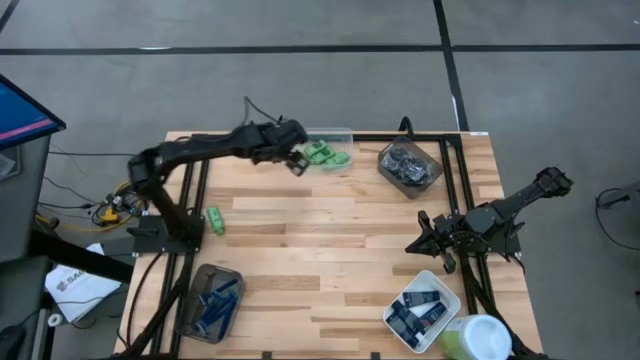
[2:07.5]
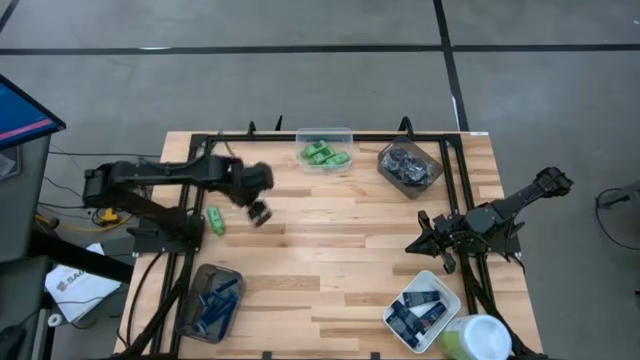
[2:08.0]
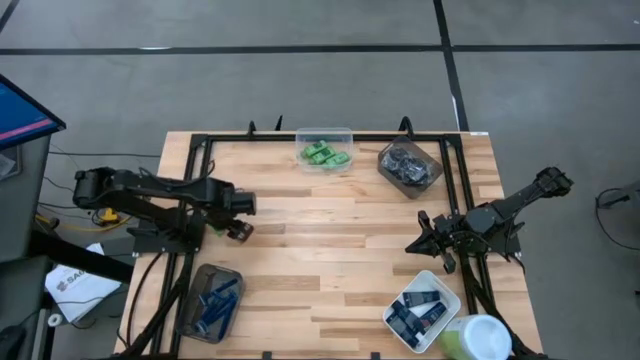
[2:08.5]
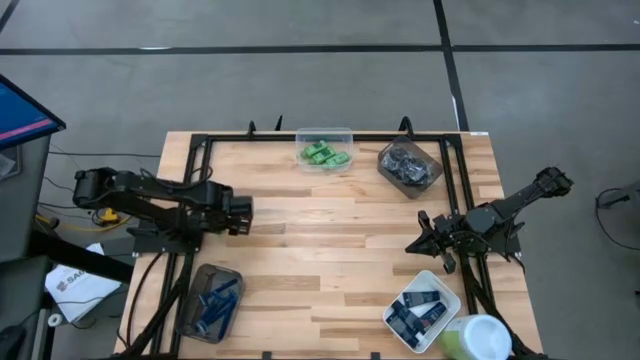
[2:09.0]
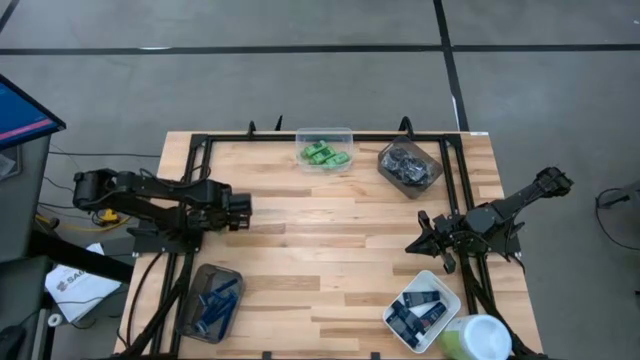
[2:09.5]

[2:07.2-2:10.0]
Task: Pick & Place Travel size toiletries
Put the green shampoo into the transparent bin

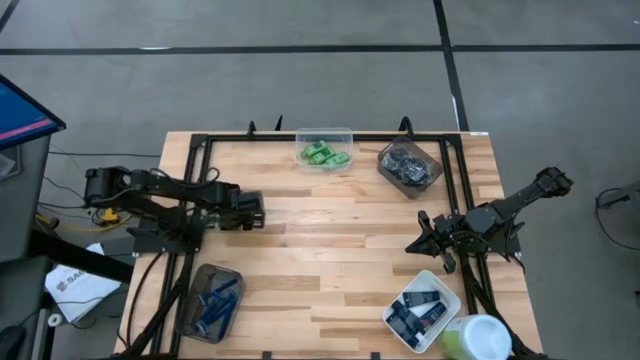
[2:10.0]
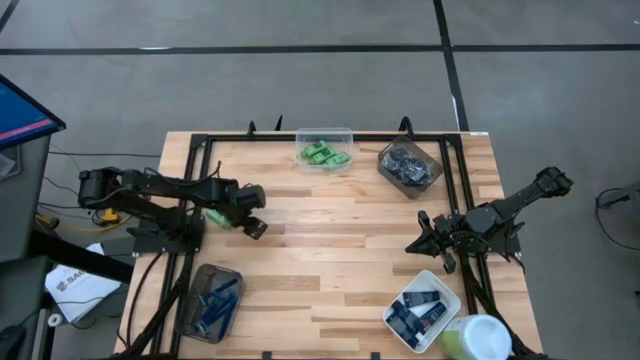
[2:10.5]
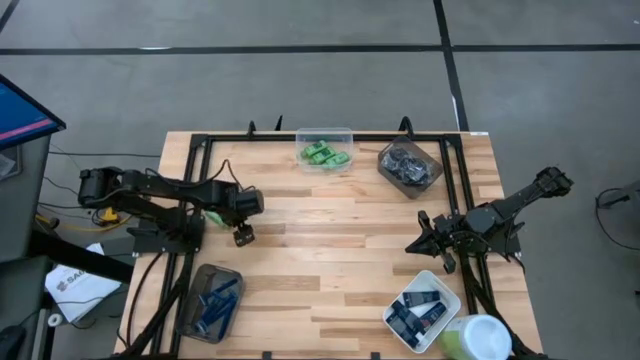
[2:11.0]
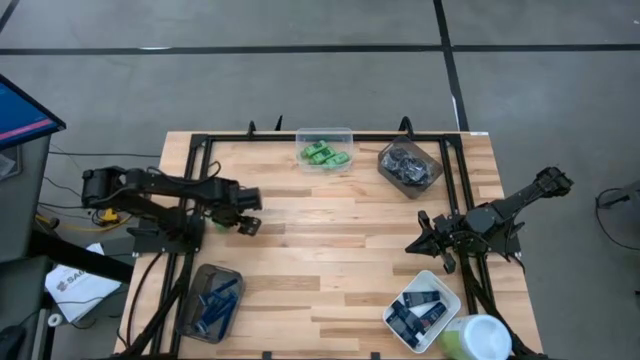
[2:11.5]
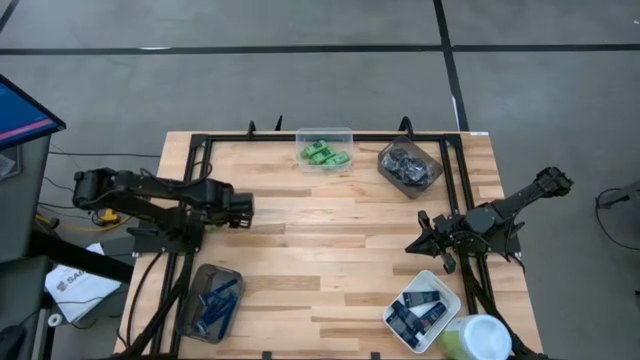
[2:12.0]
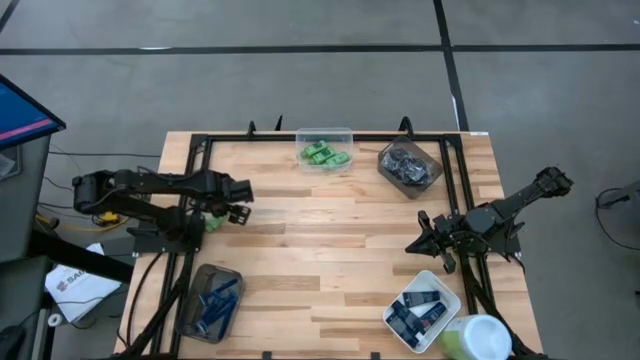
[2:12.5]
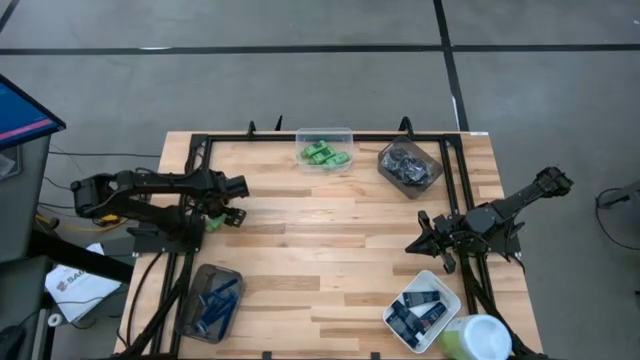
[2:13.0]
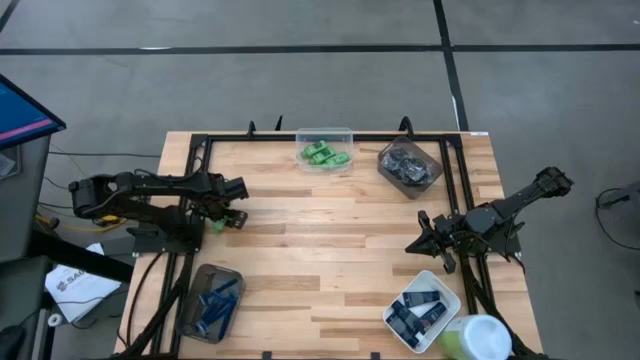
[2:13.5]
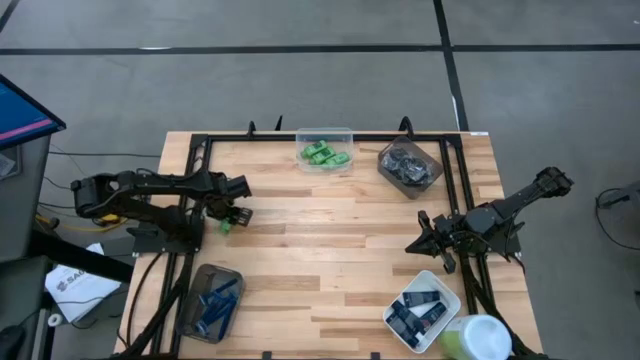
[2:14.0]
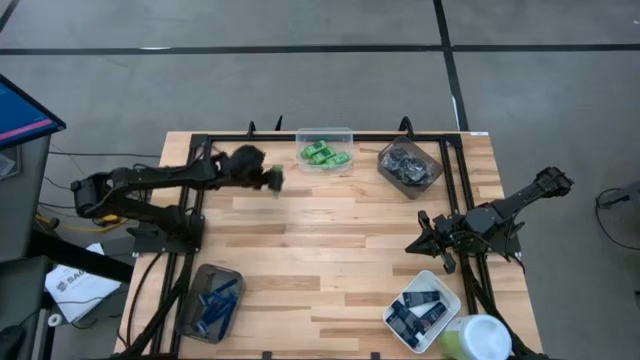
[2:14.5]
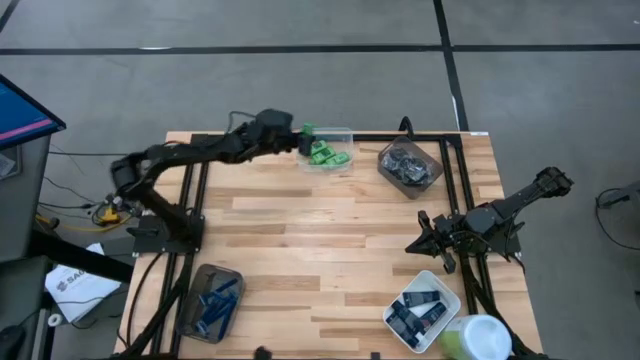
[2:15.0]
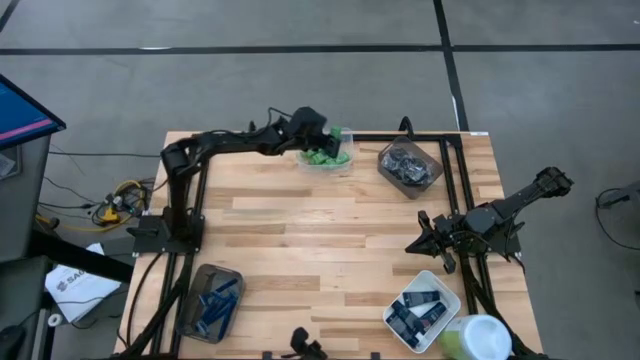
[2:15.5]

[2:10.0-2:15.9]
Put the green shampoo into the transparent bin

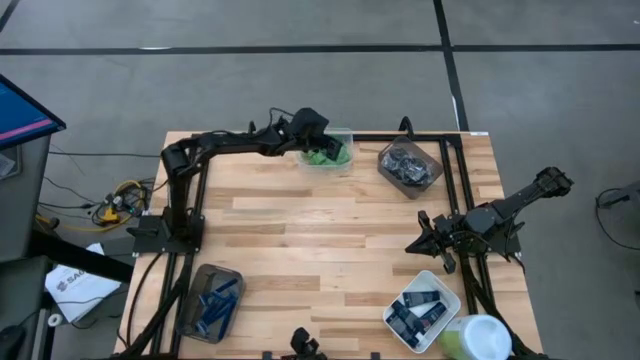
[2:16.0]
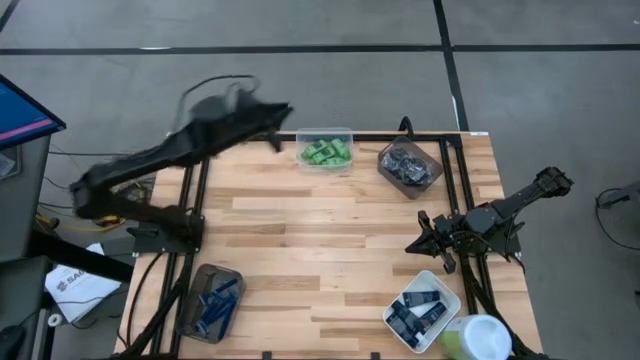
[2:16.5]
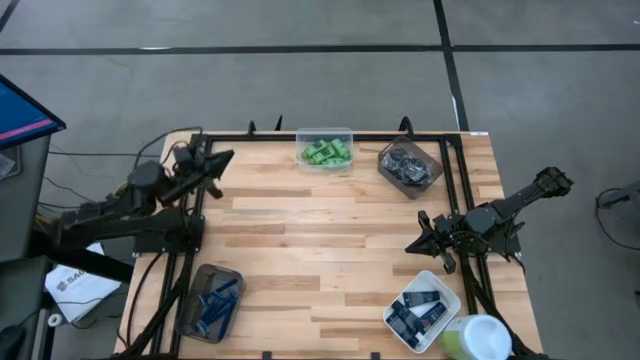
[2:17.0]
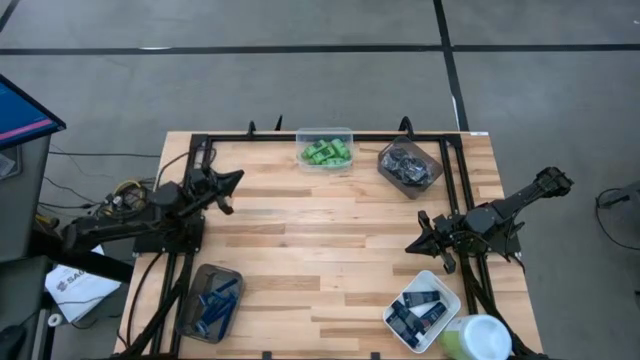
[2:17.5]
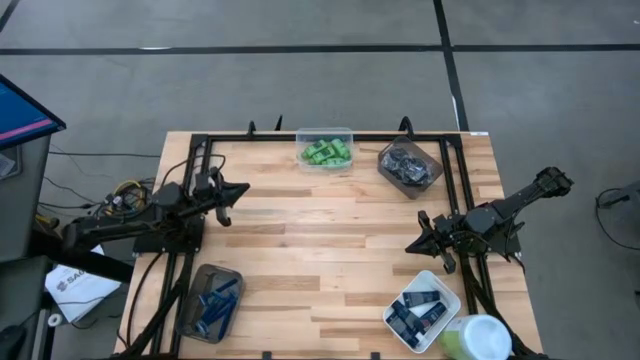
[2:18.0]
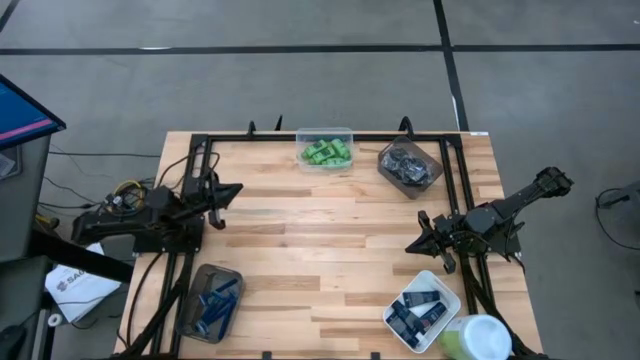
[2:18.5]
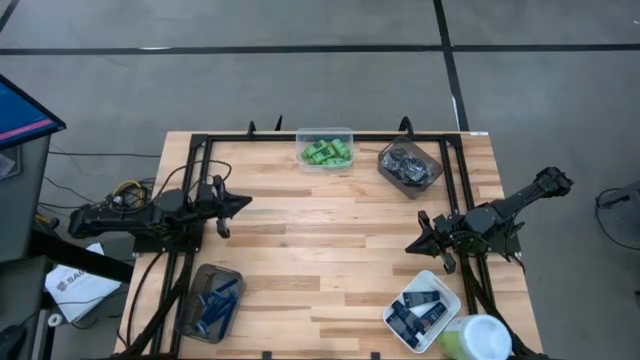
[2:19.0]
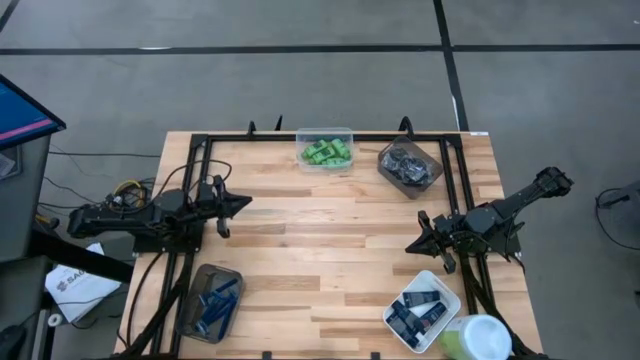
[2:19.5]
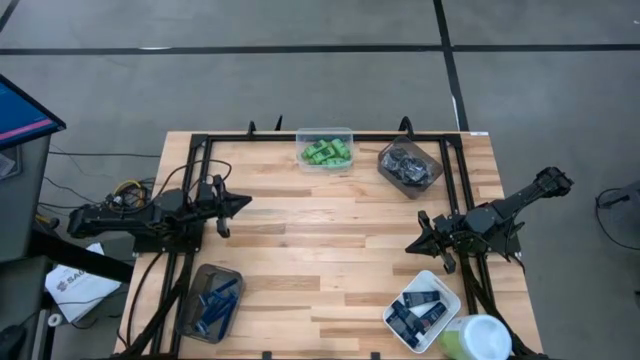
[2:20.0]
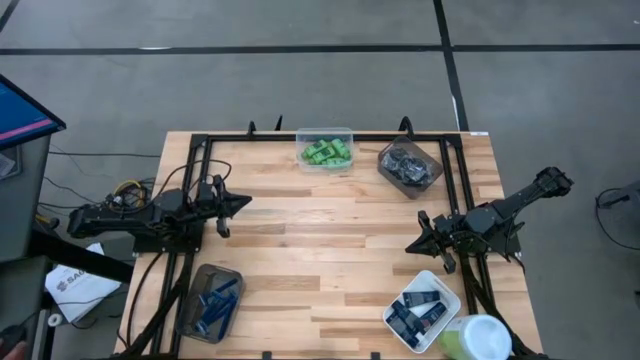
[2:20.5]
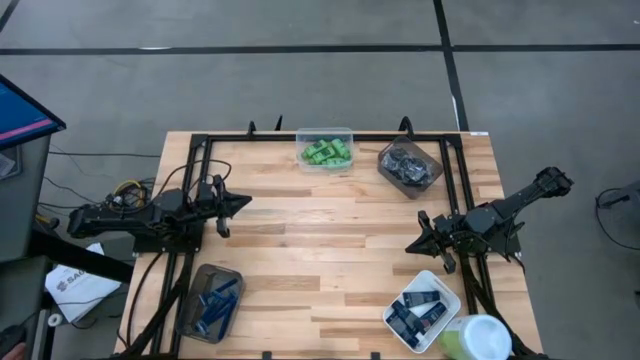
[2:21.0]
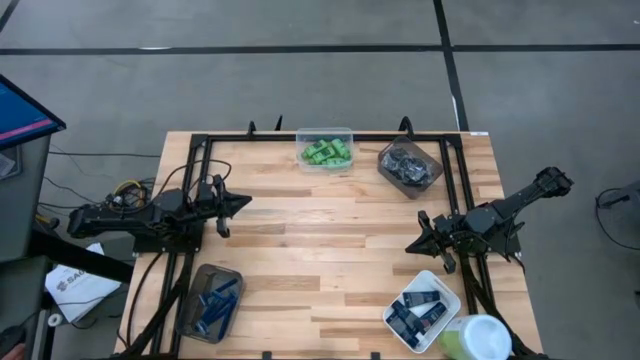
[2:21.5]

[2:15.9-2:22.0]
Return to Home Position

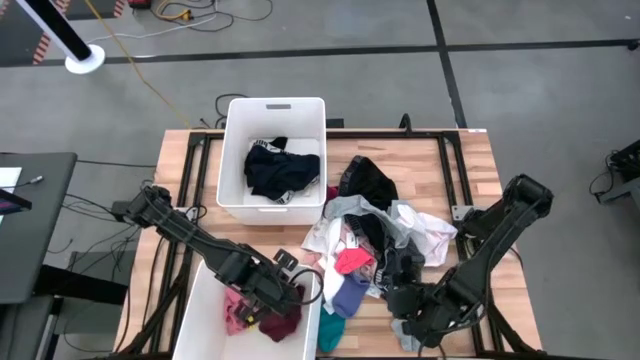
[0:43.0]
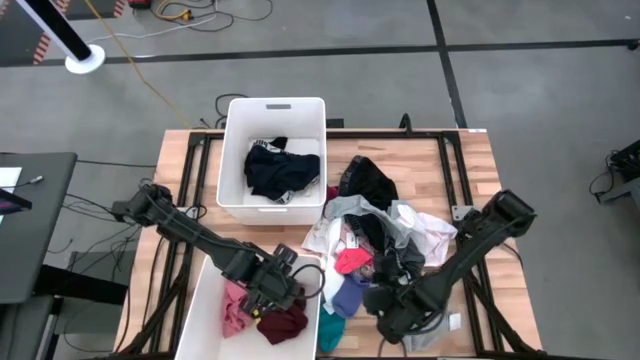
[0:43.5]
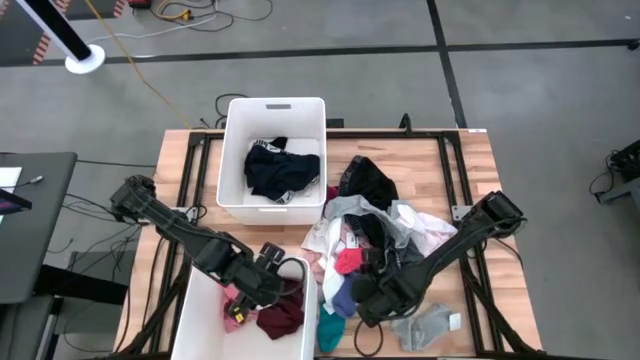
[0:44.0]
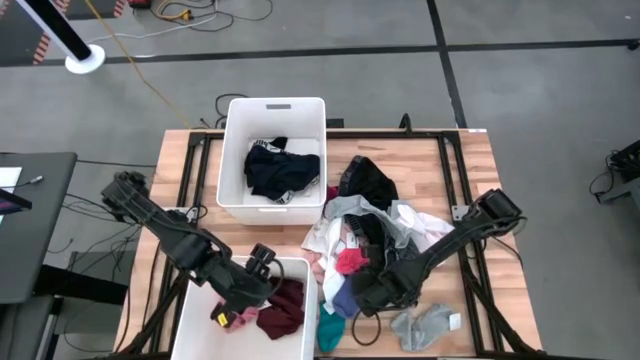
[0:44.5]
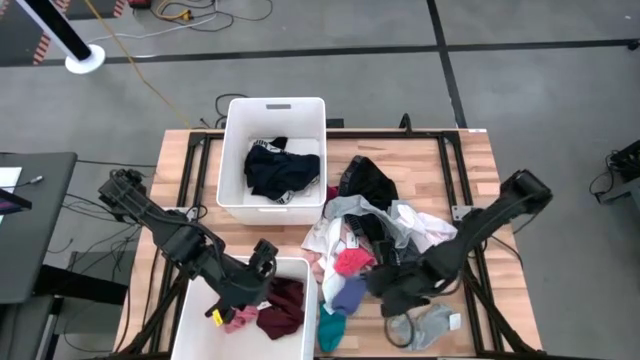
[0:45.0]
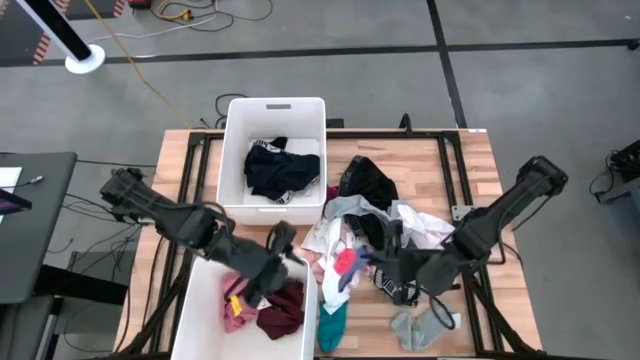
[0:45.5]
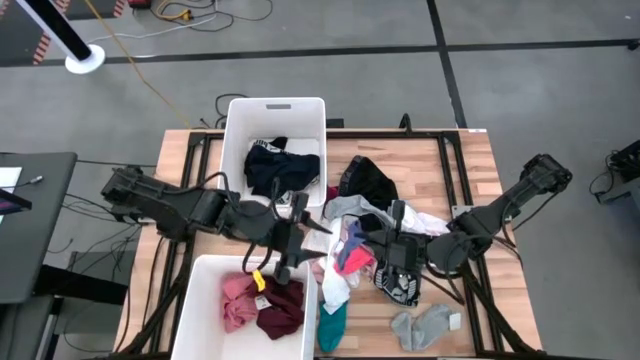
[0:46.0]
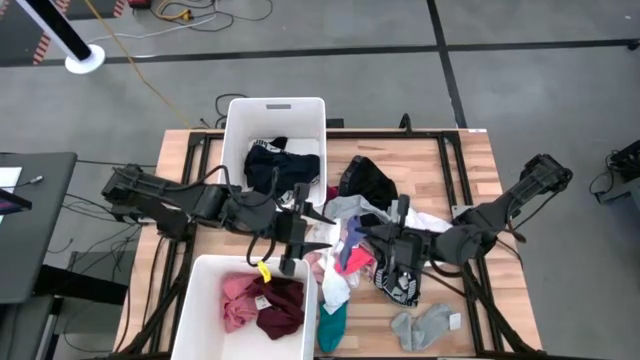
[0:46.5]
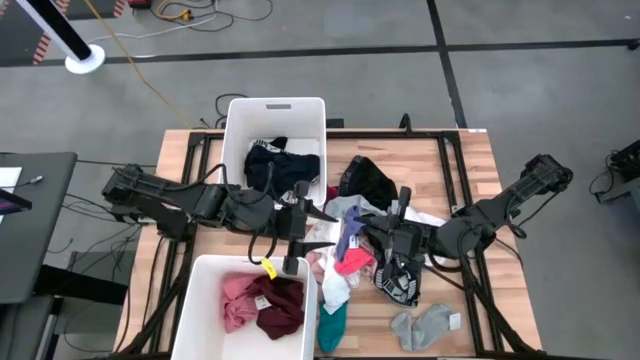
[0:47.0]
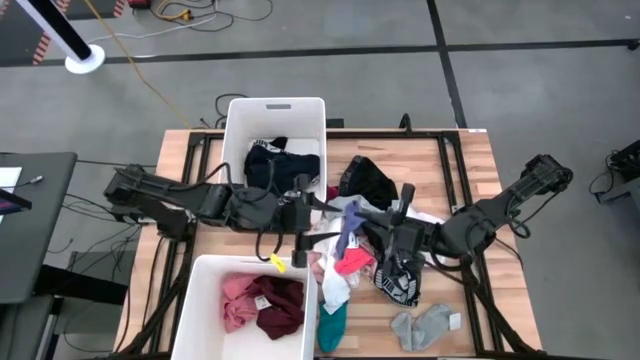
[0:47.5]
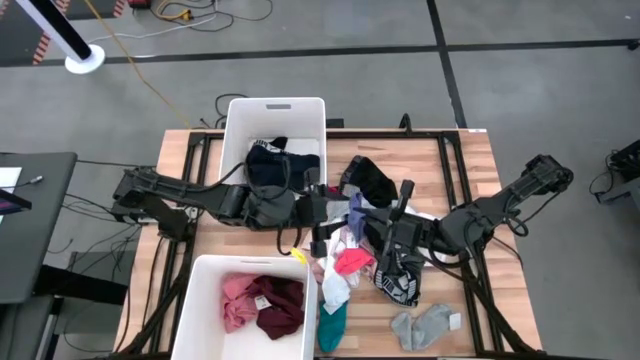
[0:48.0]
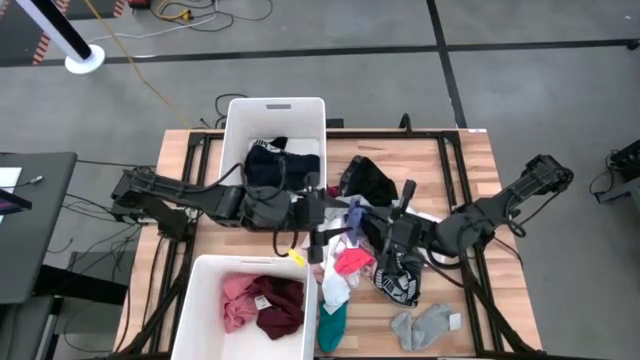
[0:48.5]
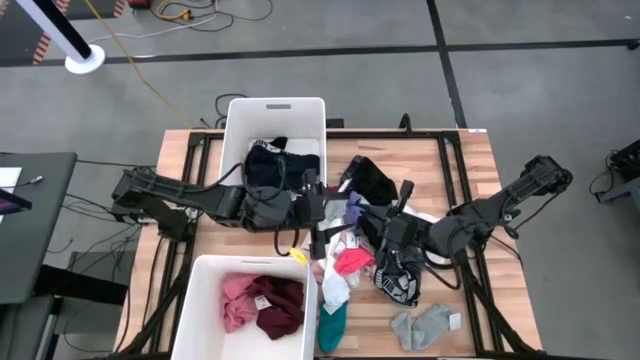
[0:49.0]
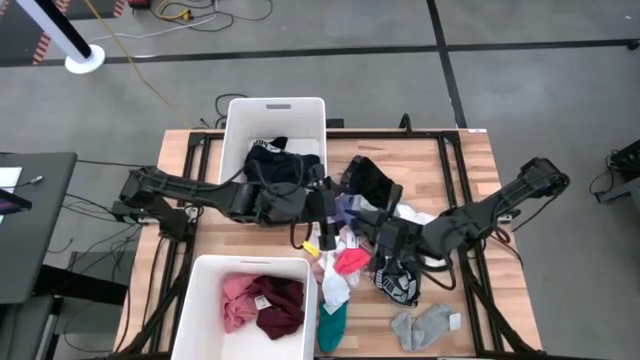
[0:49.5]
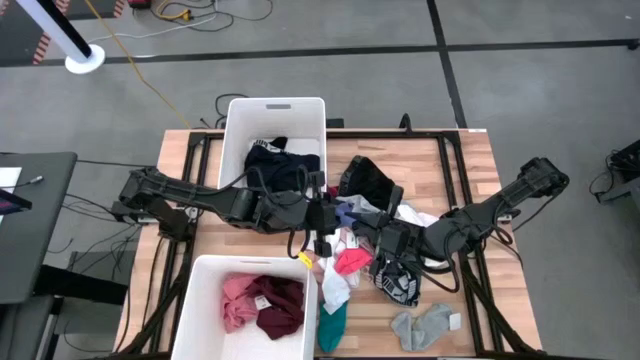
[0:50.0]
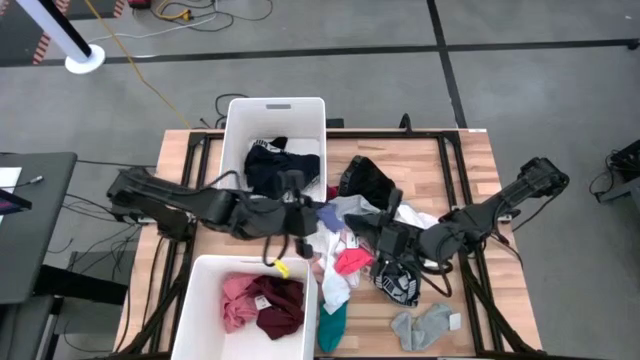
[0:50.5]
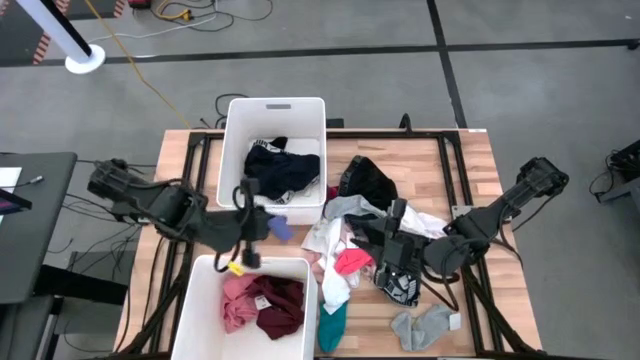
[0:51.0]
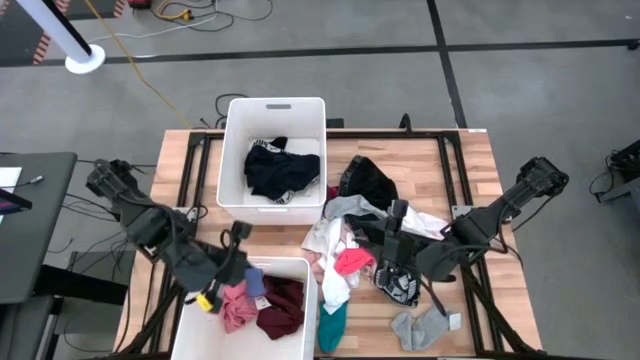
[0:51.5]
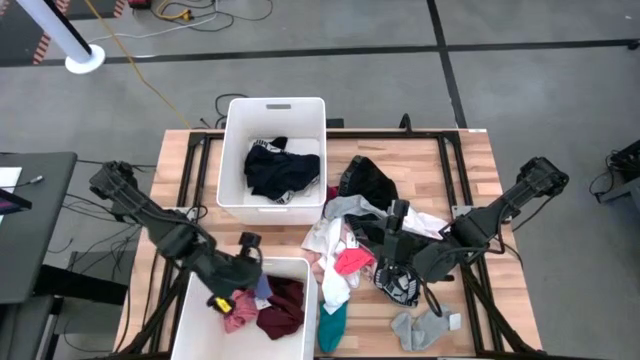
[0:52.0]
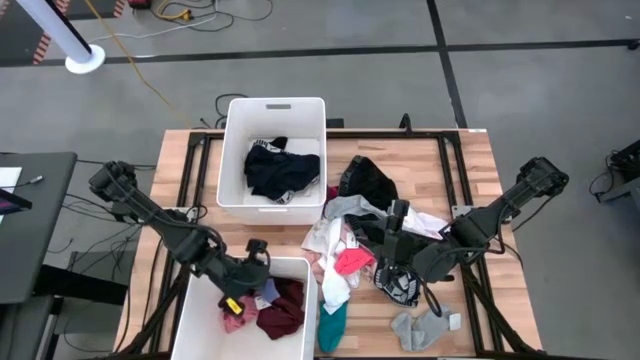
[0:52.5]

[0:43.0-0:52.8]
Task: Sort clothes
Put the violet sock into the bottom white laundry bin
